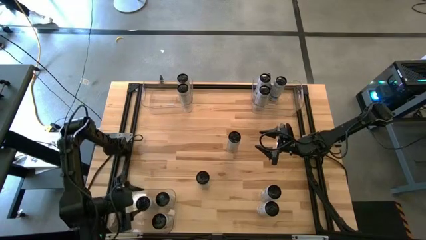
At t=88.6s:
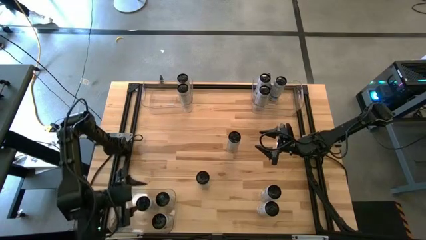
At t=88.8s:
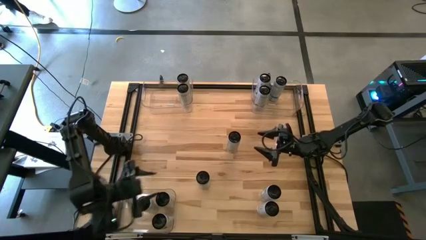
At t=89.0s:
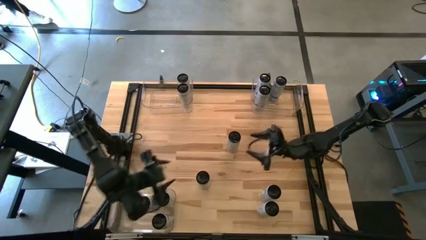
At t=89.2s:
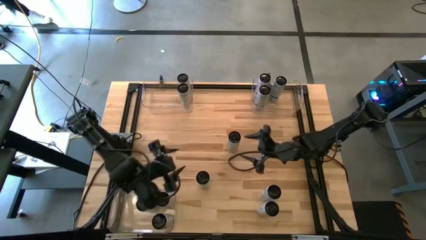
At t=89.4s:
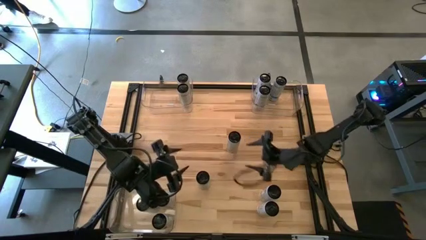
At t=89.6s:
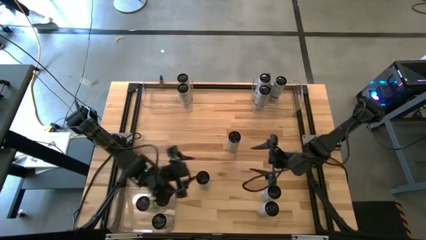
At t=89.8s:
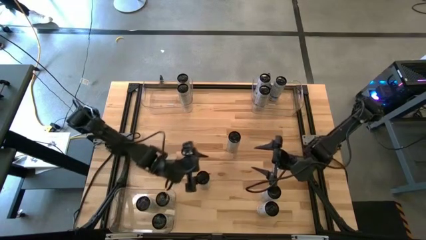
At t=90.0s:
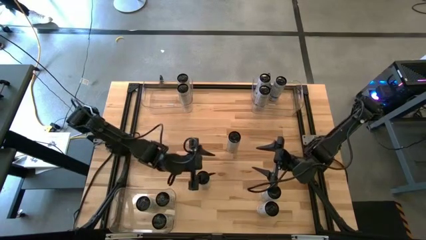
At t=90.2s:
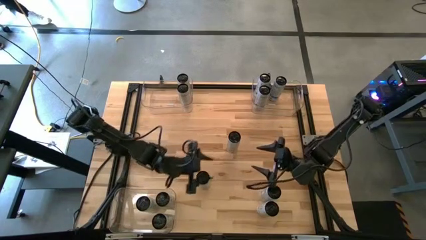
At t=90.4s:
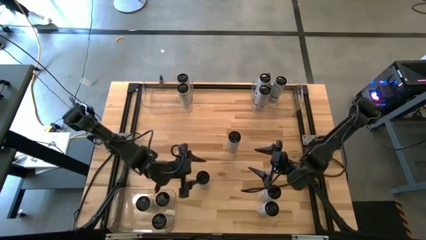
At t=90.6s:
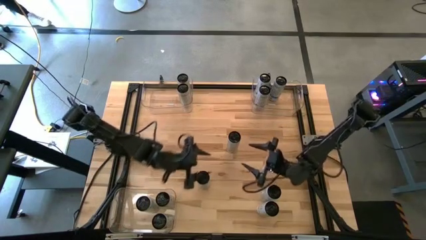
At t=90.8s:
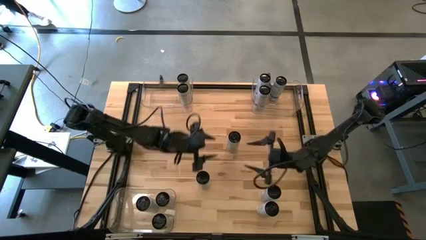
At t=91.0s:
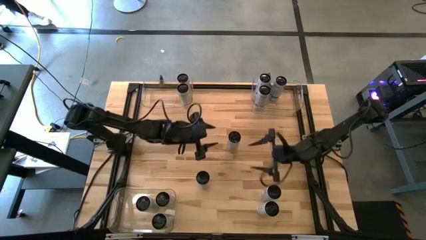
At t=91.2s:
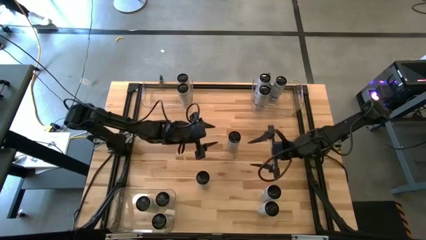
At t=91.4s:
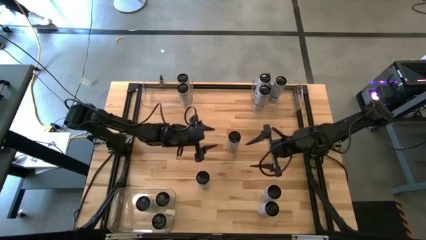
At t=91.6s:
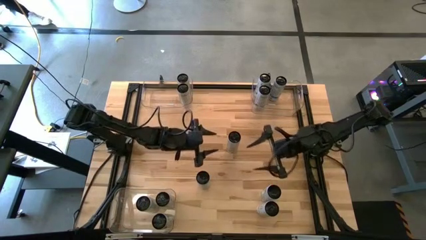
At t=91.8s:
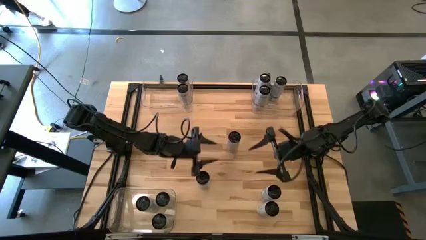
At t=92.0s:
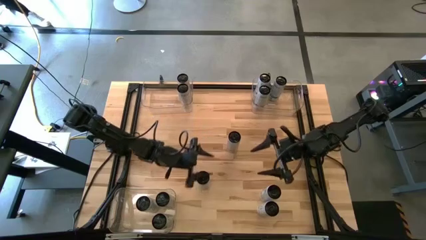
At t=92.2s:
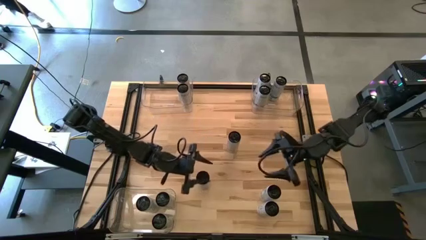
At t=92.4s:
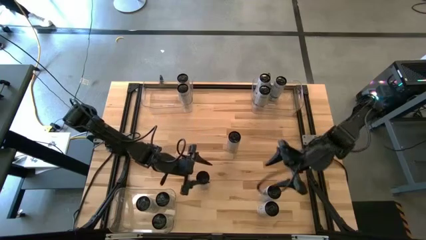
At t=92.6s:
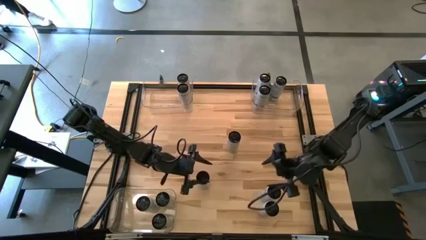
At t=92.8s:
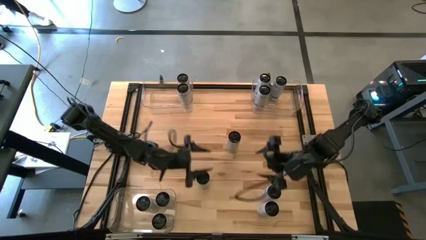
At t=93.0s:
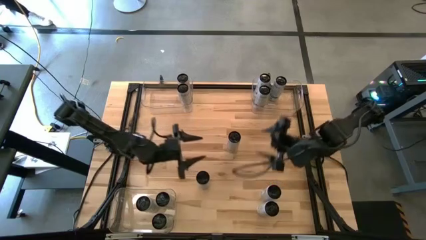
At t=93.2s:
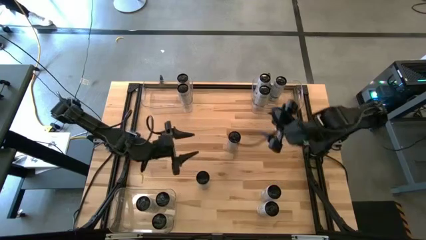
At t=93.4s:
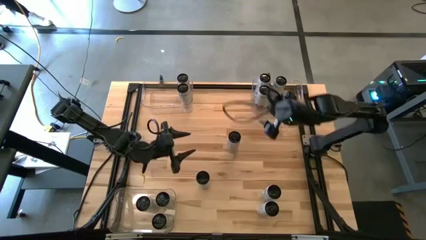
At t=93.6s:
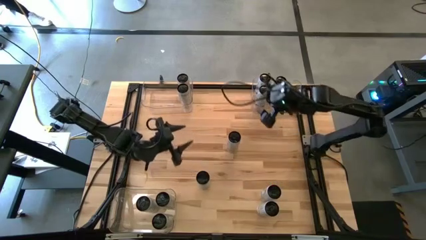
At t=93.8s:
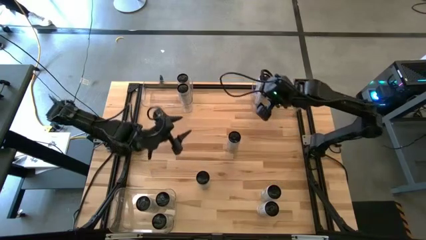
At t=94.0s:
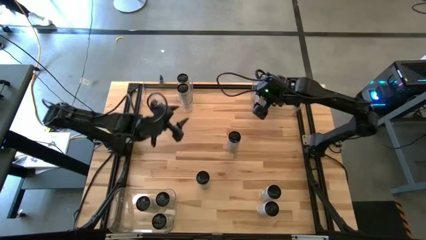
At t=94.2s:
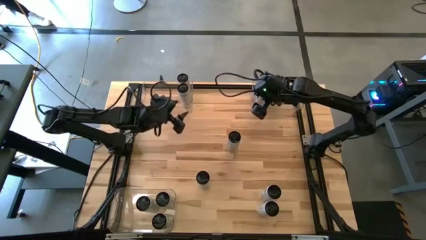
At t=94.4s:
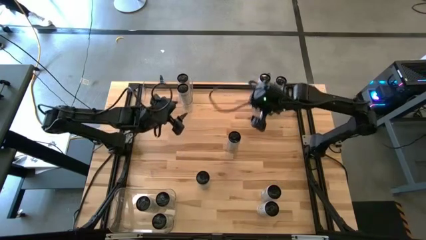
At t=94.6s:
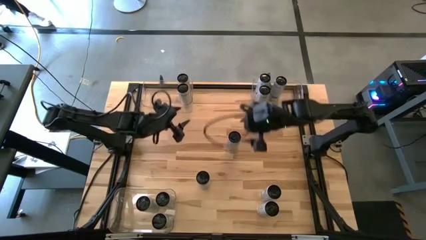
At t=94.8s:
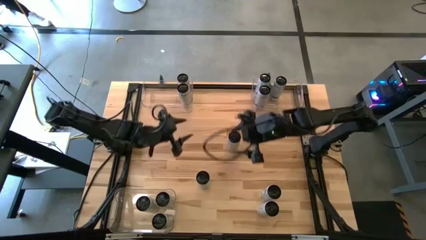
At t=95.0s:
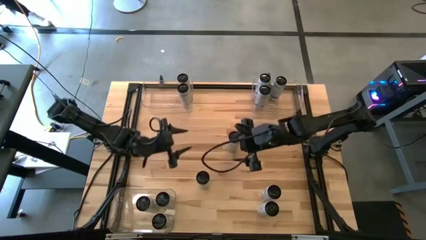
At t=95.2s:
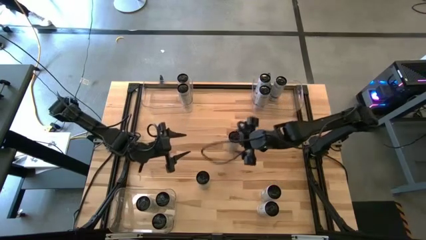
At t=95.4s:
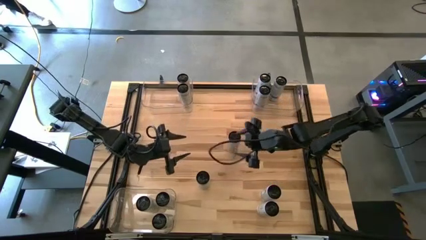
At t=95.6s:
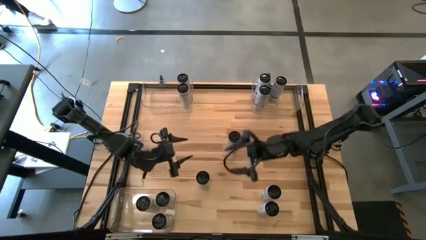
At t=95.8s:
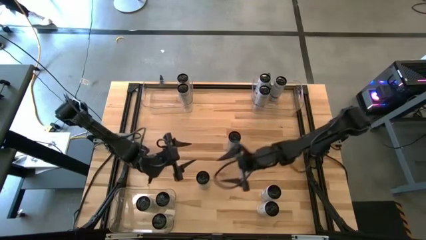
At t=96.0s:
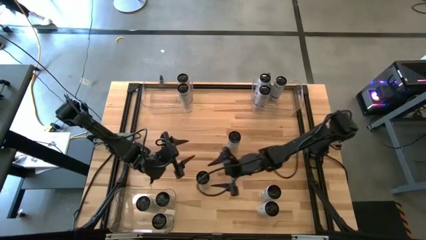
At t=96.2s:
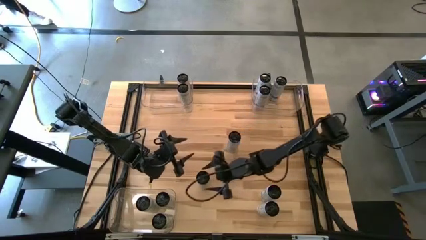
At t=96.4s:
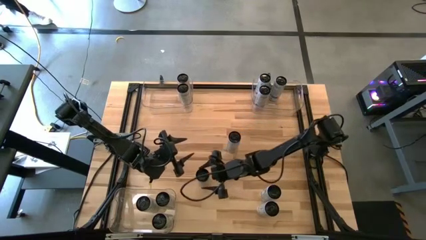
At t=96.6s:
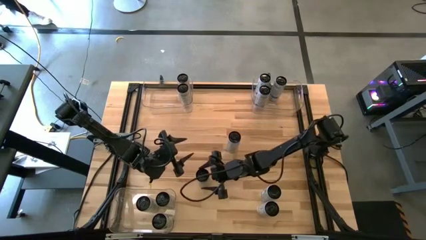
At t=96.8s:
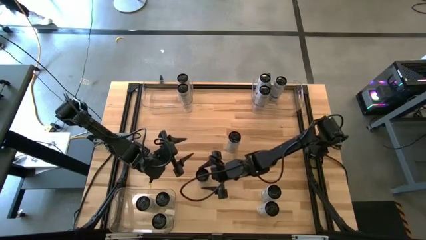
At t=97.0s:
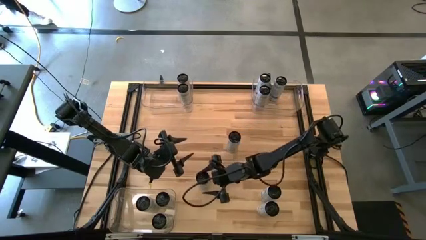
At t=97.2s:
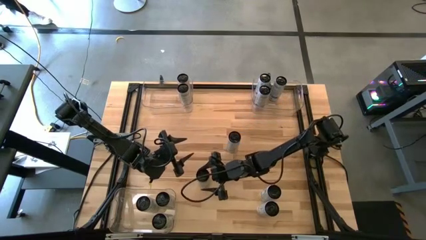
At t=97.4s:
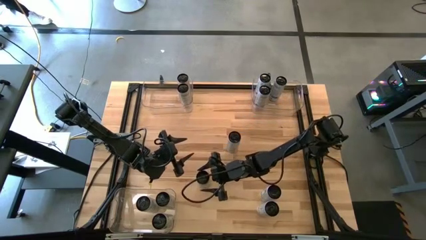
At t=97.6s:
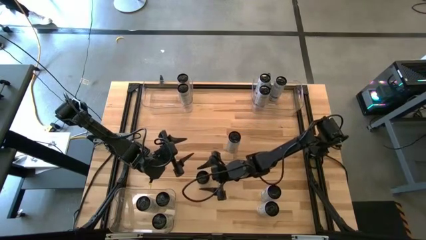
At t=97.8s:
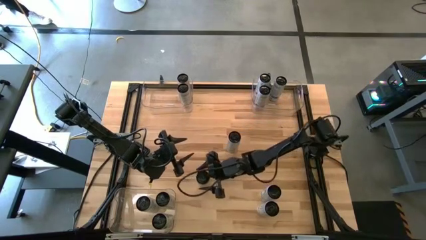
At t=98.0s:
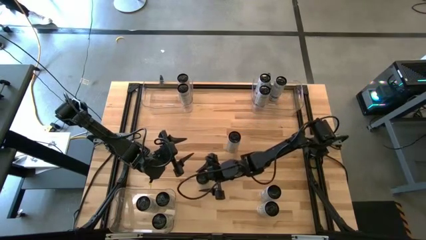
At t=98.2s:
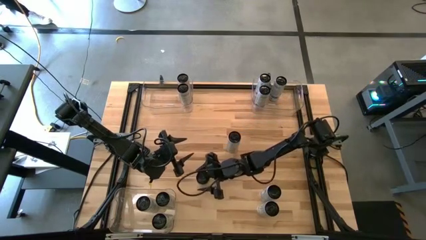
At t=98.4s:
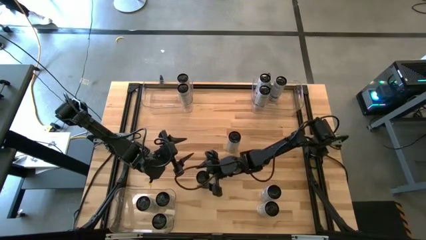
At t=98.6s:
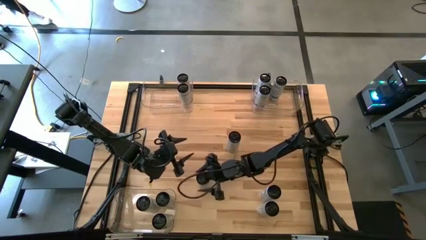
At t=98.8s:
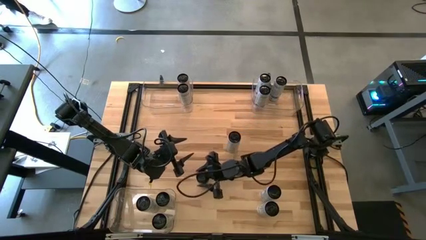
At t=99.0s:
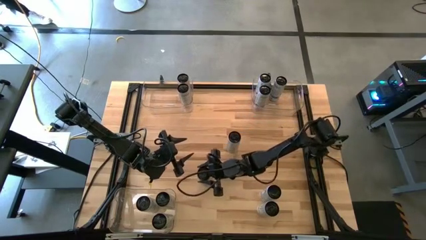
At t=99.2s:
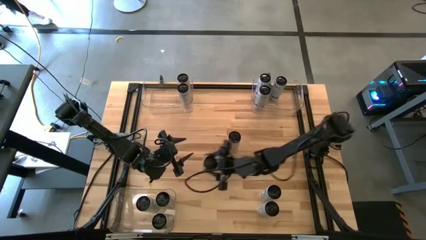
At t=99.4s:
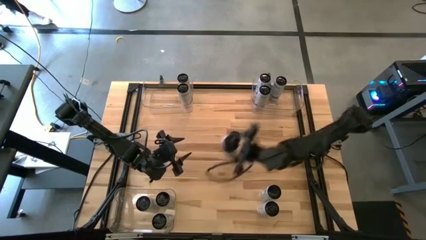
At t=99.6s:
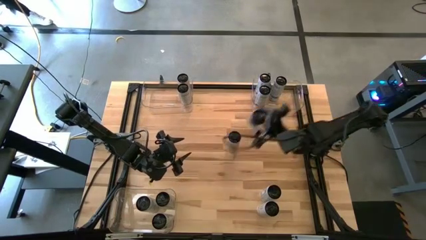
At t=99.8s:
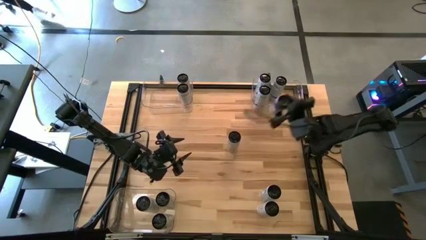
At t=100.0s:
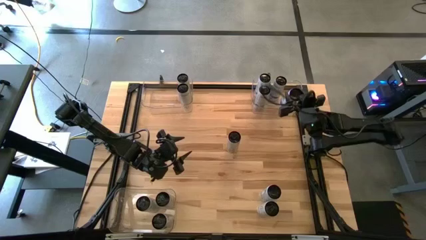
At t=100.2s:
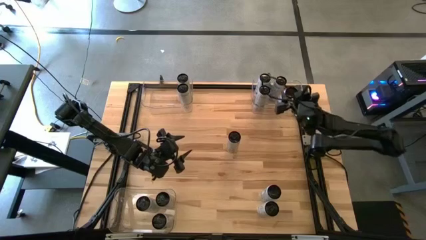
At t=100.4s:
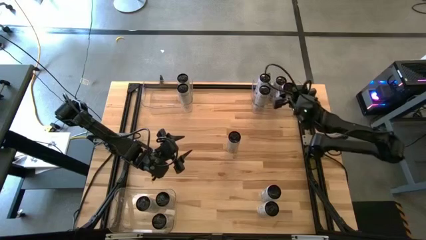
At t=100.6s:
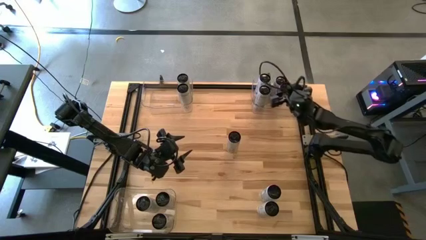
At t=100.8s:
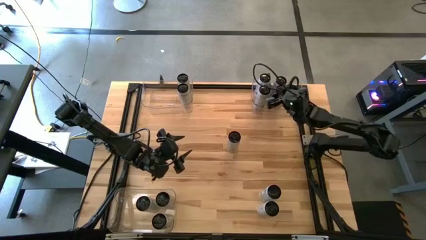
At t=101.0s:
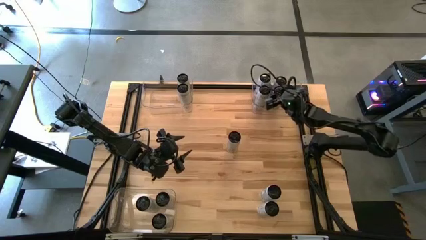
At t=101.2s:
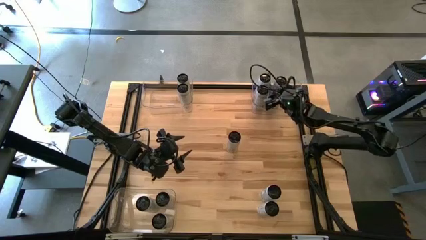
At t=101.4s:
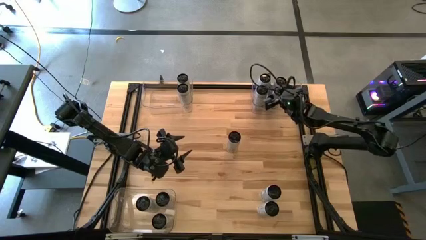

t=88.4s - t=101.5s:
Task: Sort soda cans
Put the white-blue soda can into the top right transparent bin

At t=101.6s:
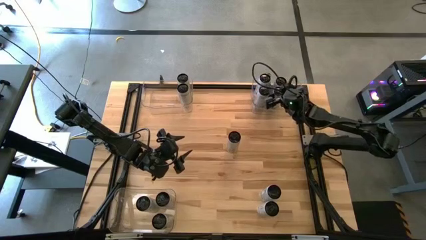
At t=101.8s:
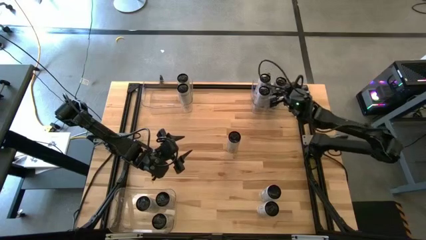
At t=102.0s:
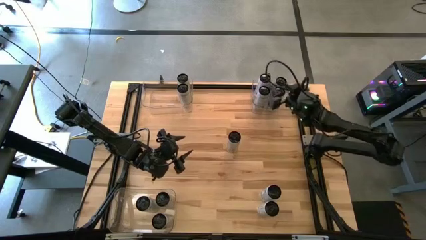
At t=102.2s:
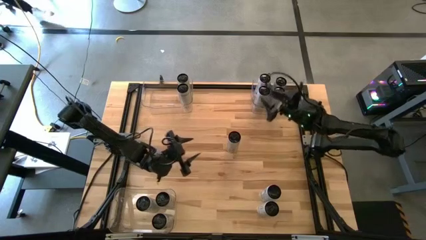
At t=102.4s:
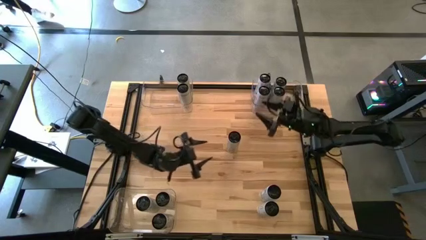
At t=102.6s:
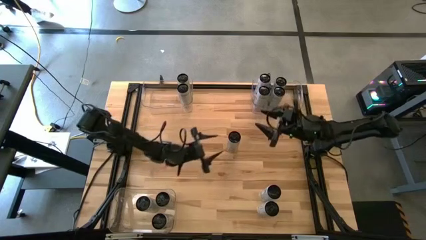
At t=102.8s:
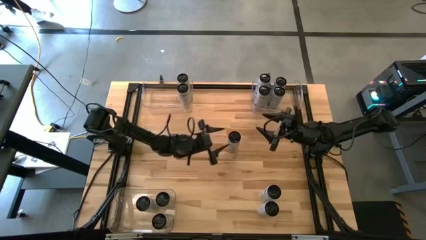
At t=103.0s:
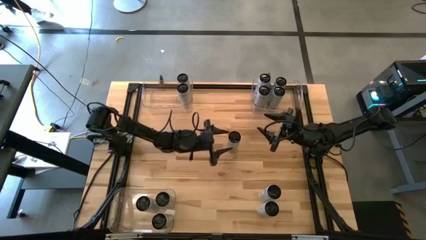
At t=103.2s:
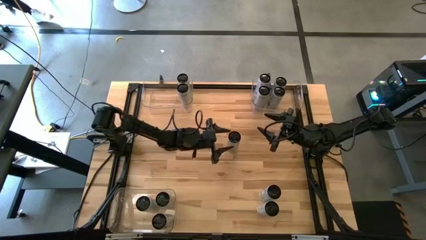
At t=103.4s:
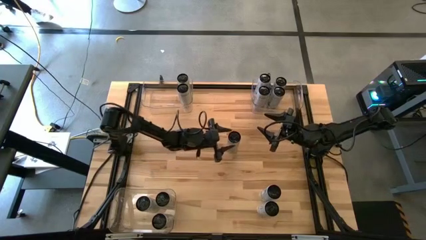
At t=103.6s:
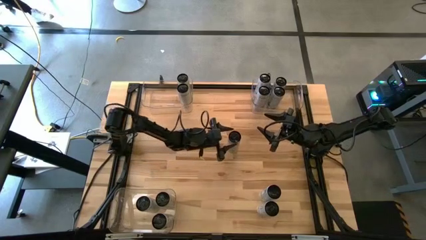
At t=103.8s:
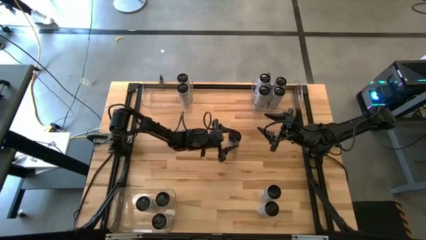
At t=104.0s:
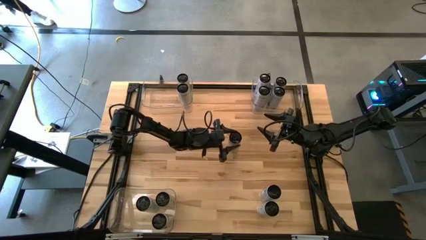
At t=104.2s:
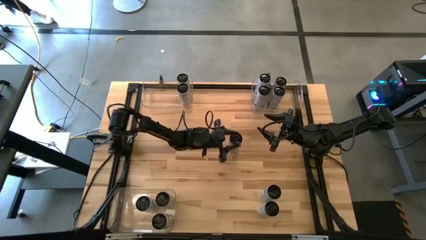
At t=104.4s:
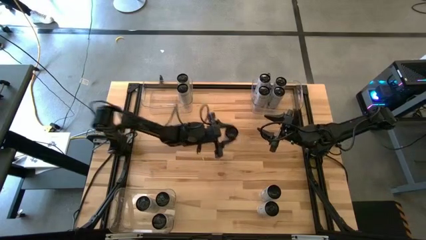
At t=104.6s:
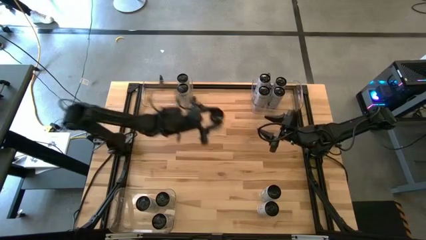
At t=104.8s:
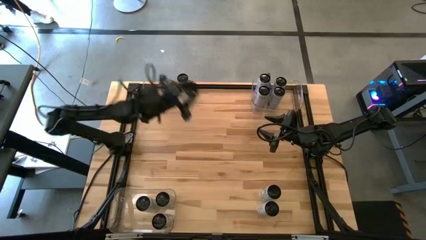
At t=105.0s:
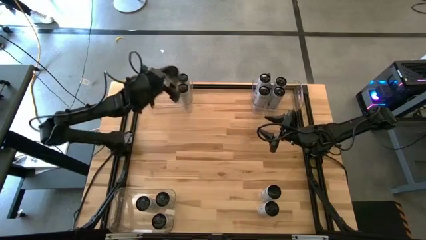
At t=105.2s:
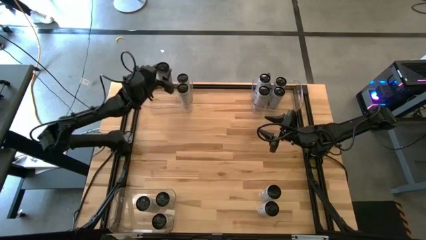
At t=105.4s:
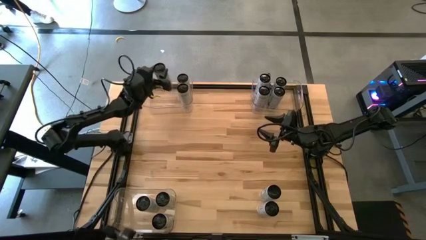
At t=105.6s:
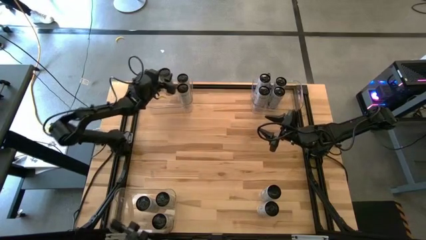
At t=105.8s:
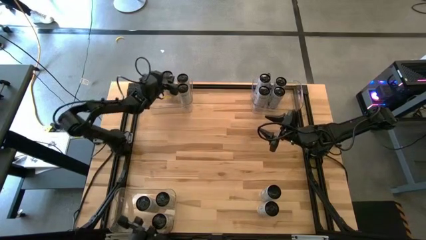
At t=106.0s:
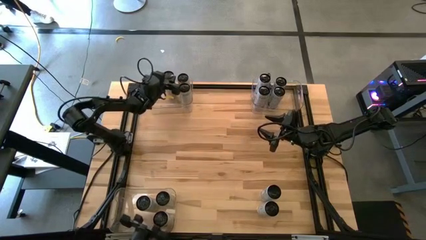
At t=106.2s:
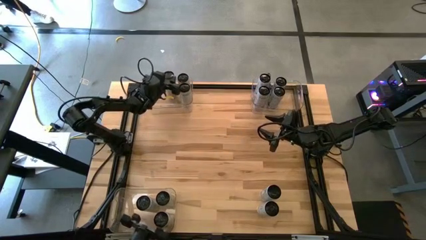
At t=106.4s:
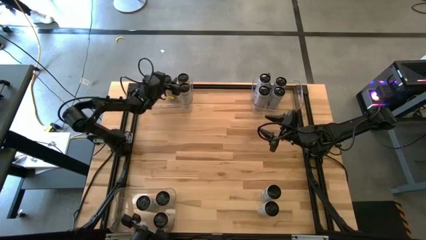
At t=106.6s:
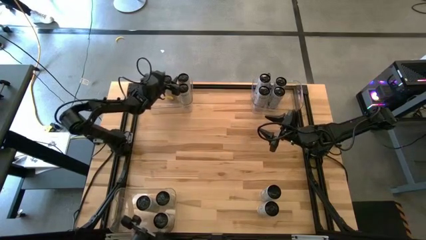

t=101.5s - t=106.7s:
Put the white-yellow soda can into the top left transparent bin
